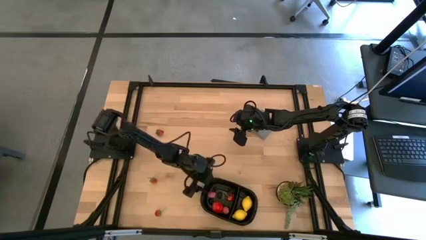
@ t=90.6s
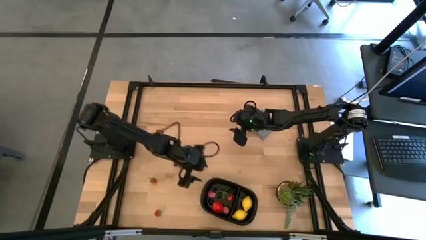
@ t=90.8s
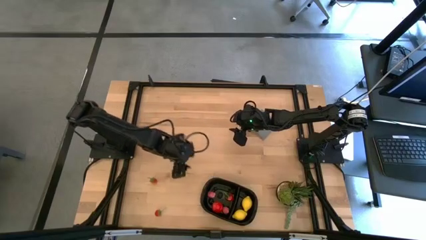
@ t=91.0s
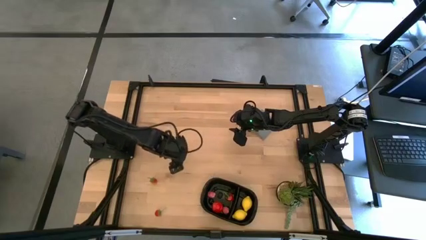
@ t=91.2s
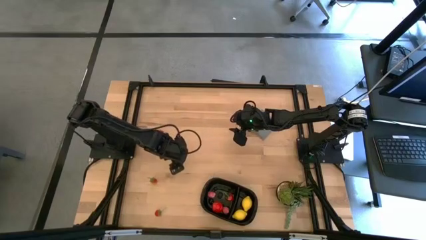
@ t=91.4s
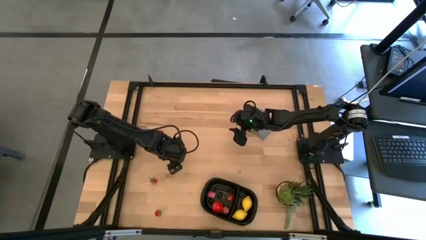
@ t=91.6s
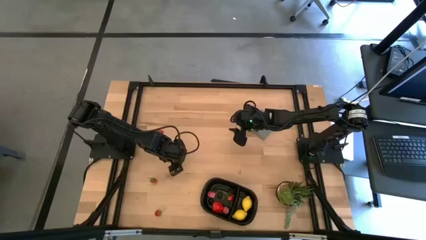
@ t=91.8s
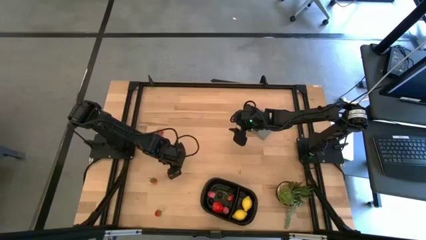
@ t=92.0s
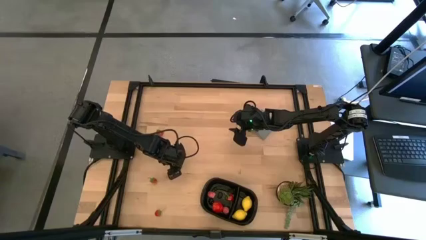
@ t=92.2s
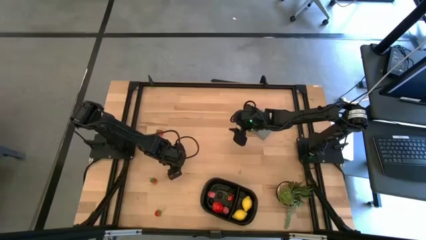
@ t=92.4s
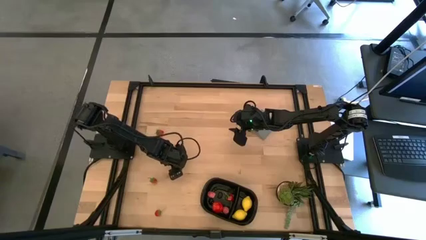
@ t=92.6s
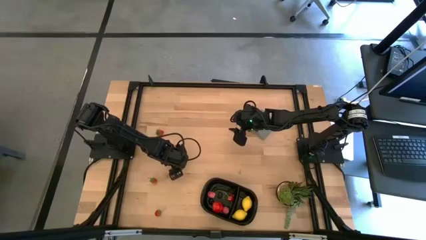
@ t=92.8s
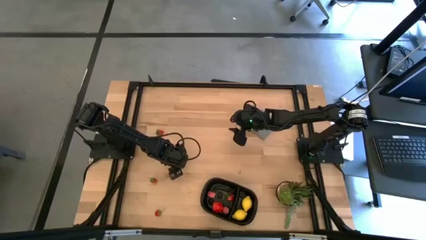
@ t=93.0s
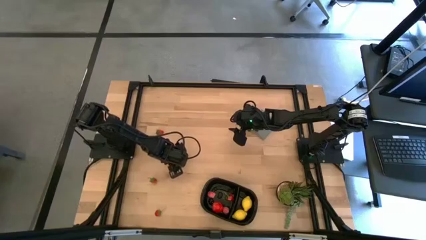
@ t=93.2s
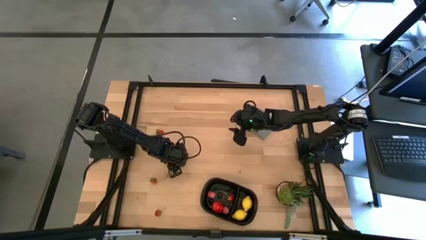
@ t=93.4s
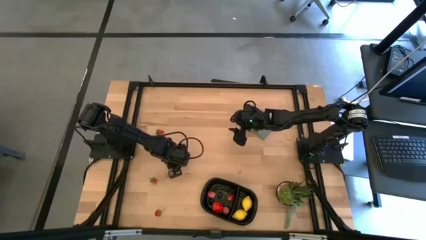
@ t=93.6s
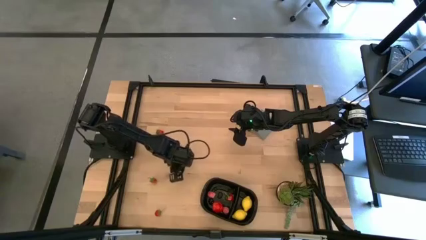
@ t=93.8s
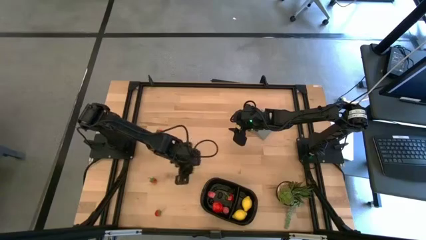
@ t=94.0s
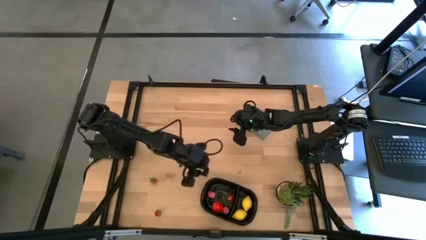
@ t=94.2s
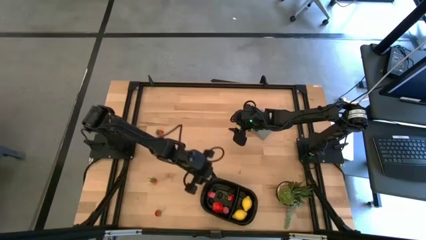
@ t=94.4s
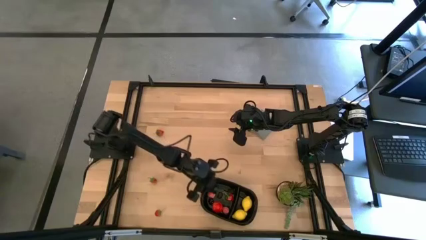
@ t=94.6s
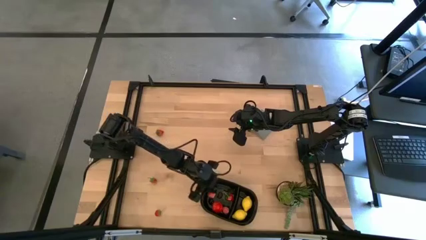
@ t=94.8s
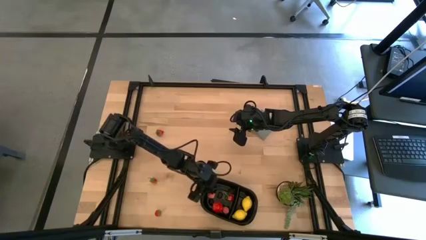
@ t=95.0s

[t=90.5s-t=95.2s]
Task: Pick and placing Produce into tupperware
Put the cherry into the black bin

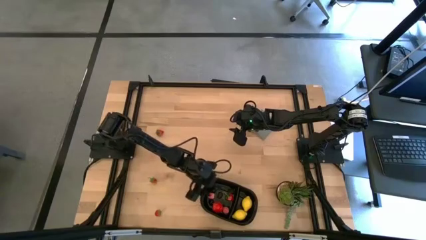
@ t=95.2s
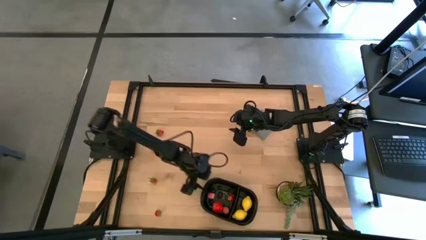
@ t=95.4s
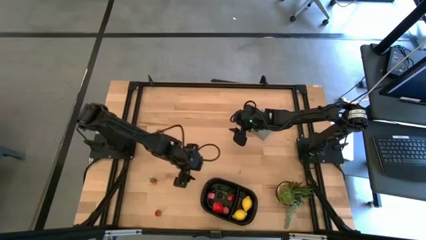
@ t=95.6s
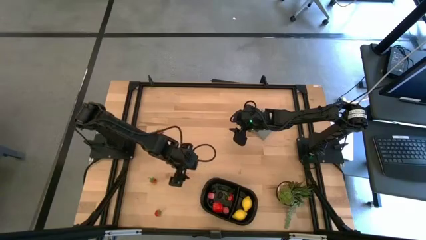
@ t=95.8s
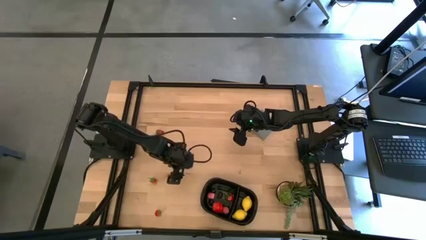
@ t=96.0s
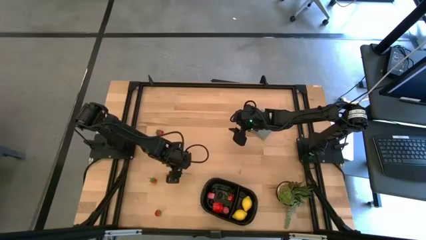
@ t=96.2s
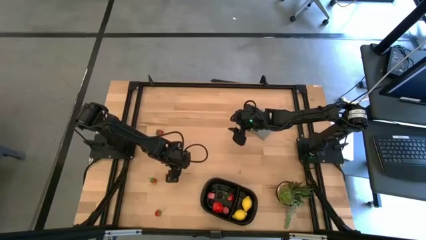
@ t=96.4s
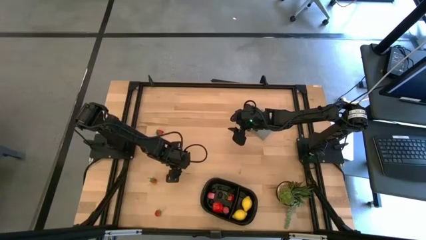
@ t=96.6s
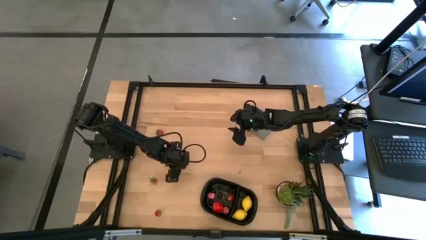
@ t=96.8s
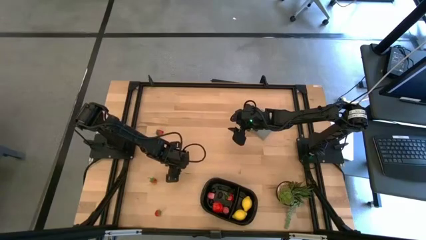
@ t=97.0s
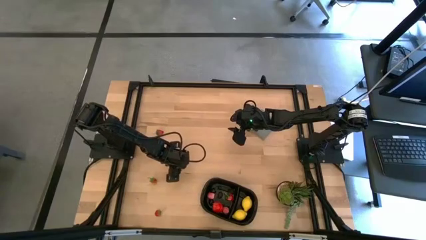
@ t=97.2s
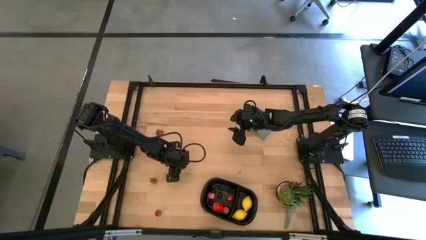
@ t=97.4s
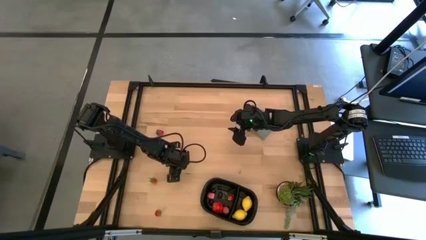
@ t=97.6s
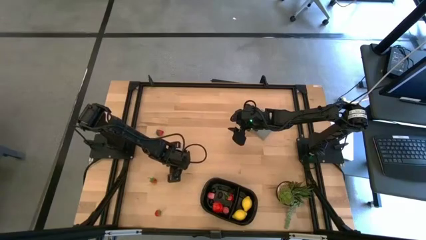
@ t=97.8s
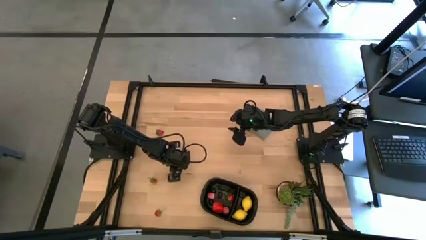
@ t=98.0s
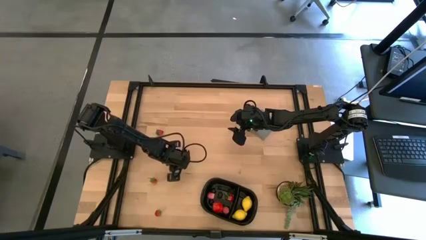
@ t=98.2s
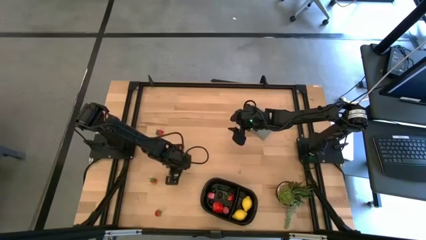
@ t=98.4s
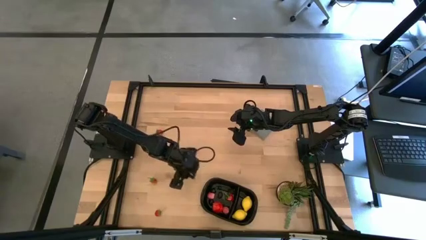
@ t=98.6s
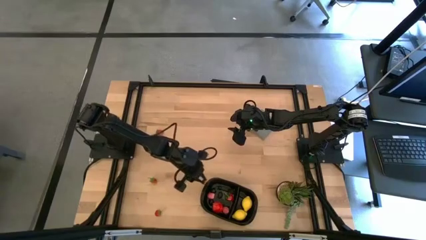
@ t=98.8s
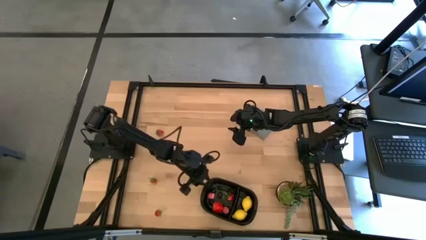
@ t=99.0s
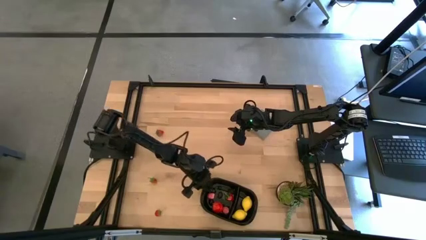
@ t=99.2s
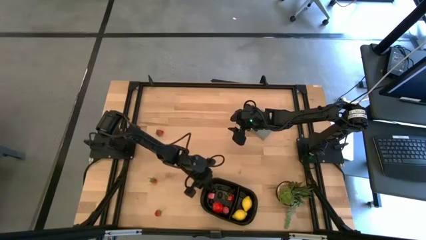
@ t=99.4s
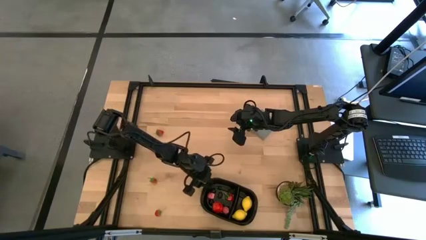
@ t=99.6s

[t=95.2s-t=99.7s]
Put the blueberry into the black bin

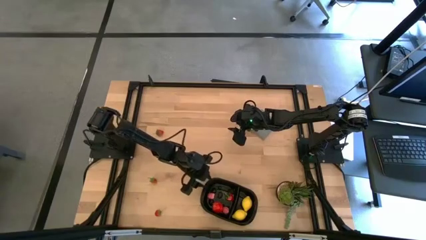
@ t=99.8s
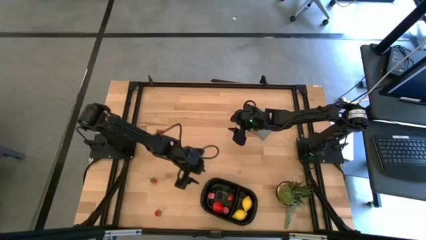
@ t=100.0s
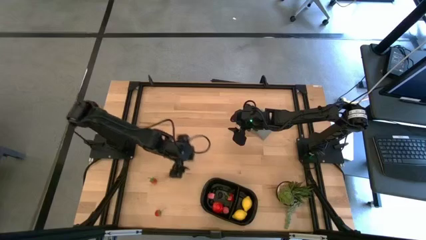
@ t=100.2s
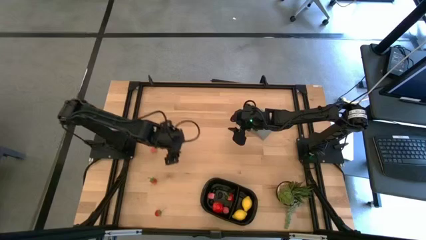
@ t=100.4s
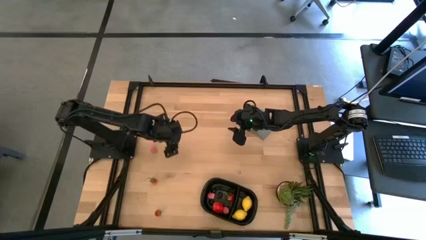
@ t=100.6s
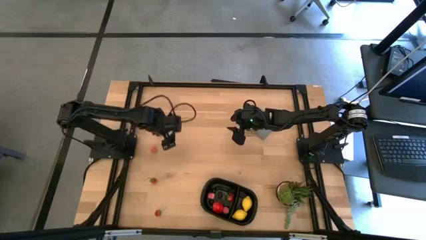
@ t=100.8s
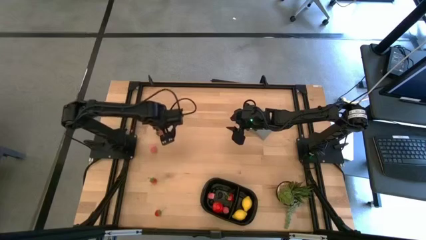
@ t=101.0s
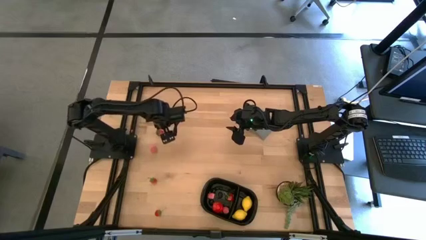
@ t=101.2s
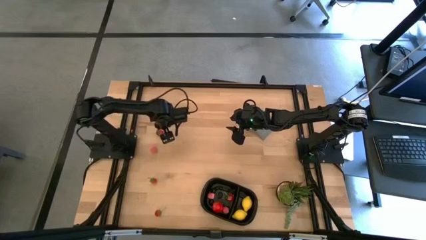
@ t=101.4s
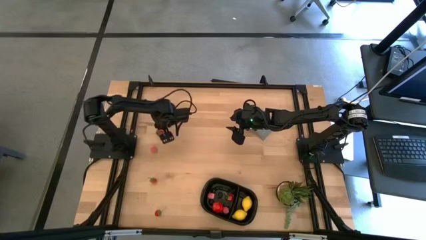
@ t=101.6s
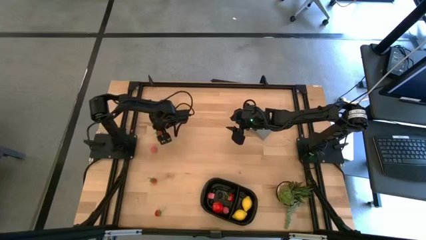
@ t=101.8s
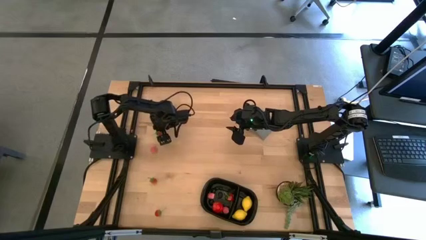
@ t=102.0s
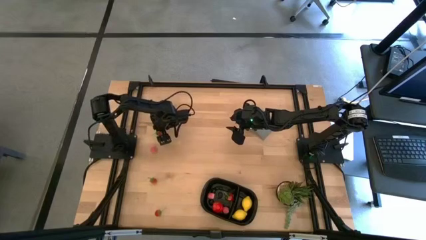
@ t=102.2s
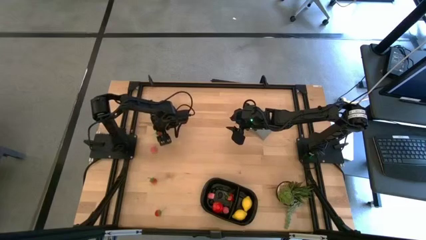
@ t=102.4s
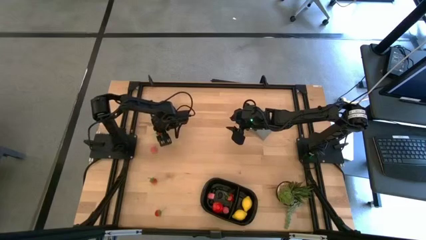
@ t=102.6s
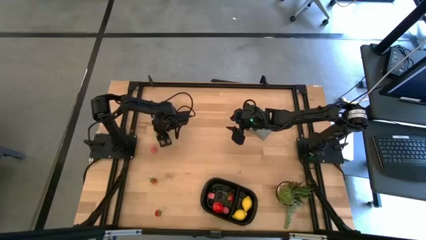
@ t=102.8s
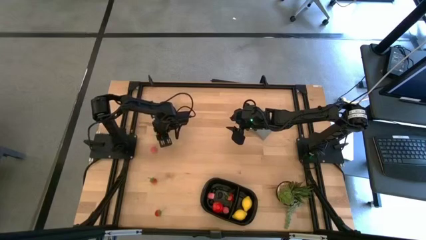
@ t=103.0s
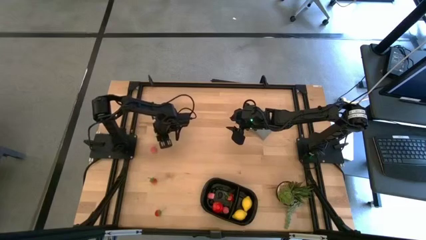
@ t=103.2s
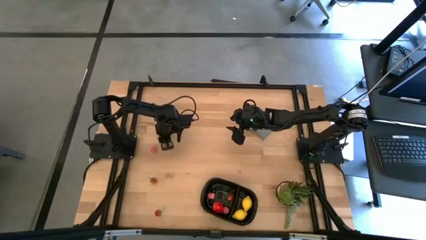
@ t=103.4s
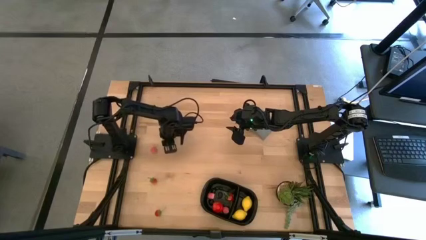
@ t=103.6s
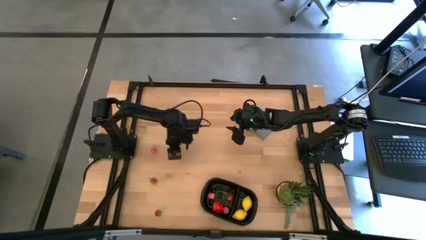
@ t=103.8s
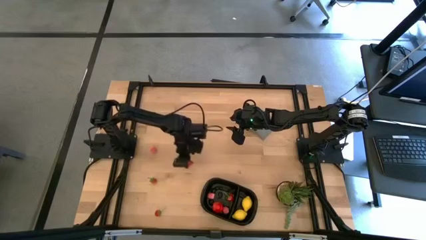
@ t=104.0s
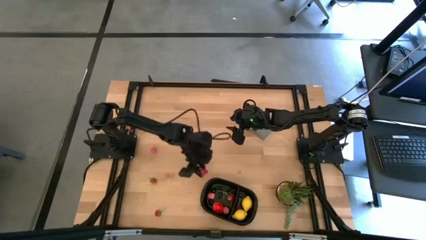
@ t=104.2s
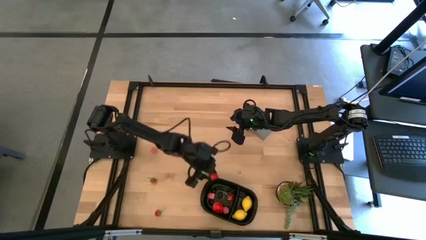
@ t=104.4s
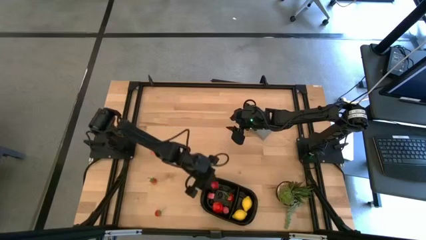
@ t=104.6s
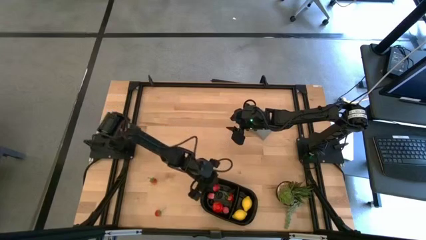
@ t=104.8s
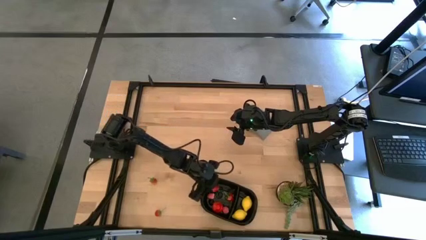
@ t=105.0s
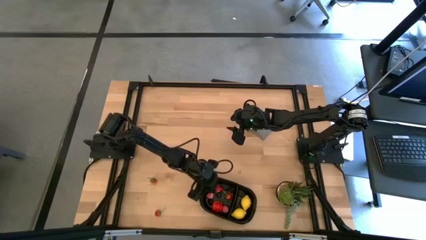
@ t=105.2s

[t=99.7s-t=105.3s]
Put the strawberry into the black bin
